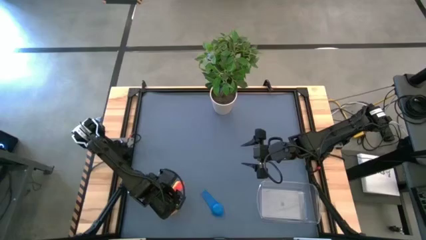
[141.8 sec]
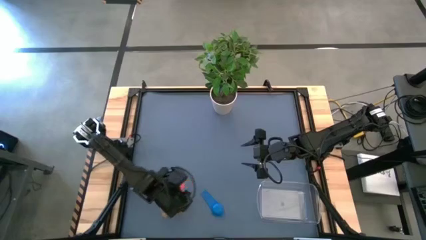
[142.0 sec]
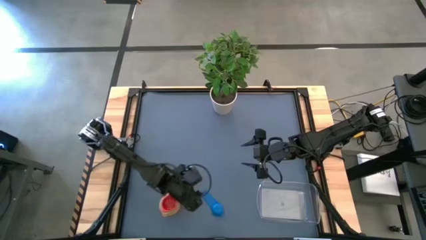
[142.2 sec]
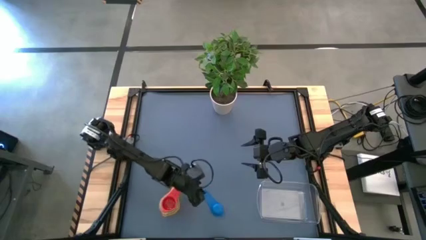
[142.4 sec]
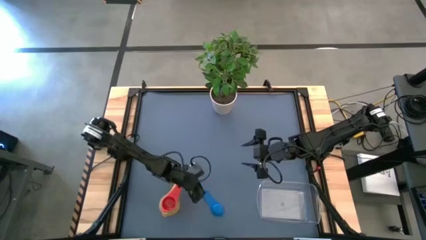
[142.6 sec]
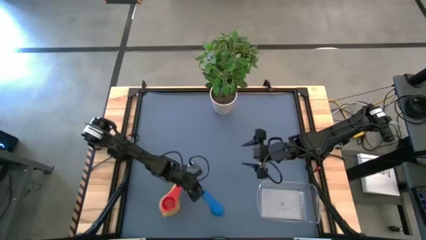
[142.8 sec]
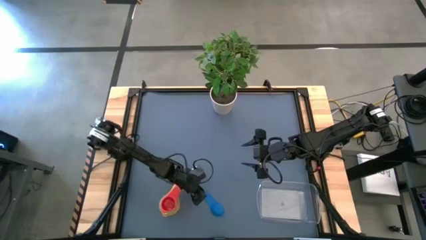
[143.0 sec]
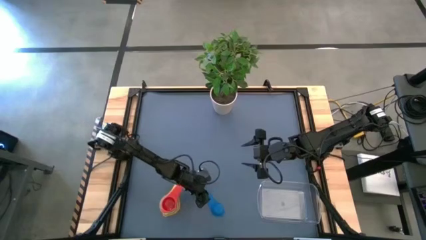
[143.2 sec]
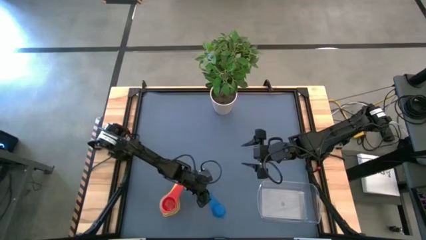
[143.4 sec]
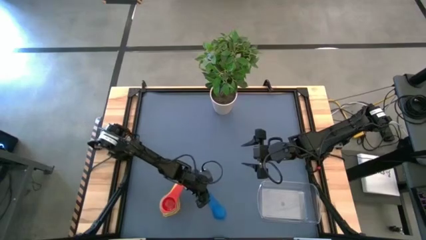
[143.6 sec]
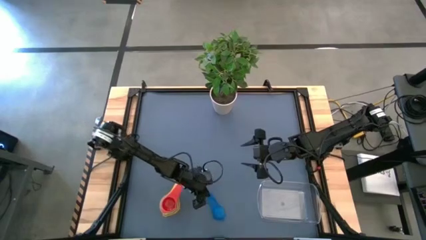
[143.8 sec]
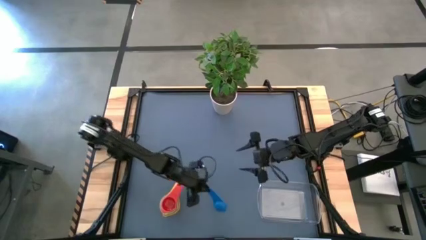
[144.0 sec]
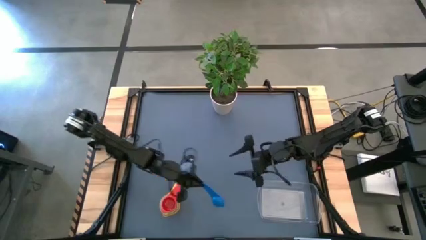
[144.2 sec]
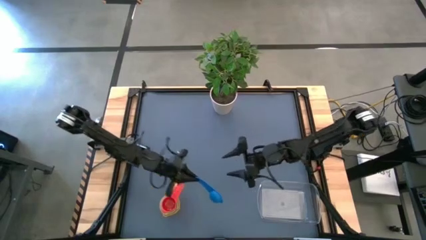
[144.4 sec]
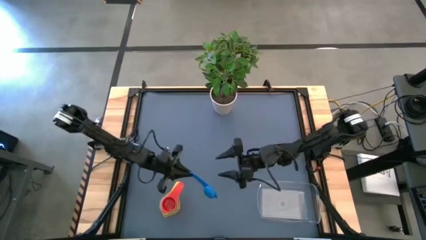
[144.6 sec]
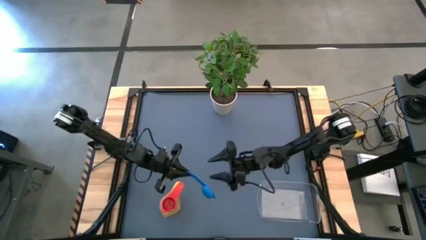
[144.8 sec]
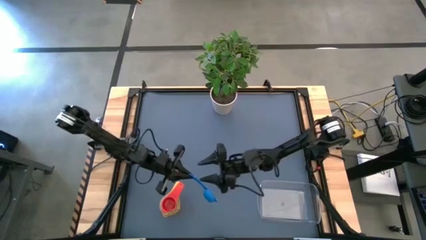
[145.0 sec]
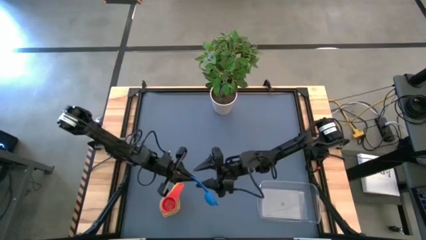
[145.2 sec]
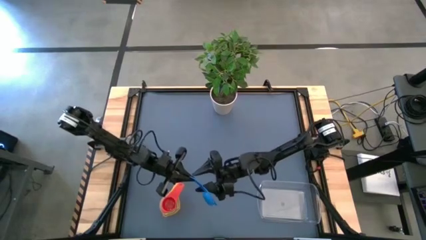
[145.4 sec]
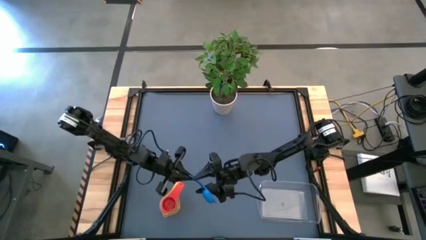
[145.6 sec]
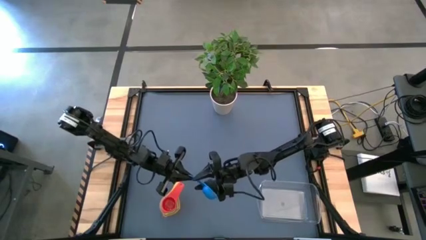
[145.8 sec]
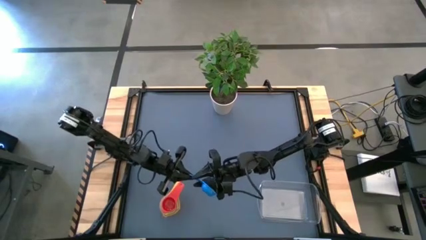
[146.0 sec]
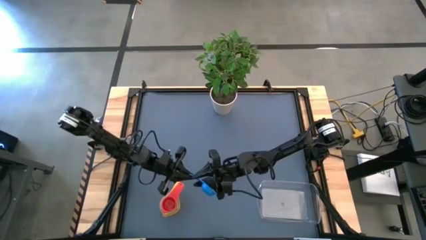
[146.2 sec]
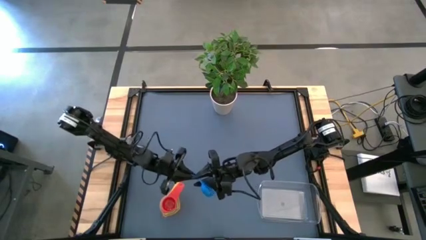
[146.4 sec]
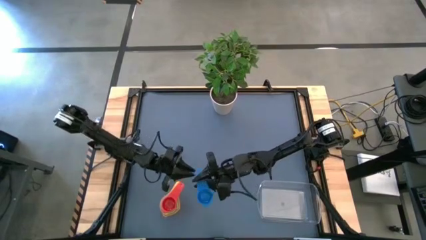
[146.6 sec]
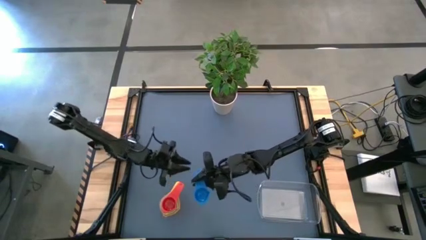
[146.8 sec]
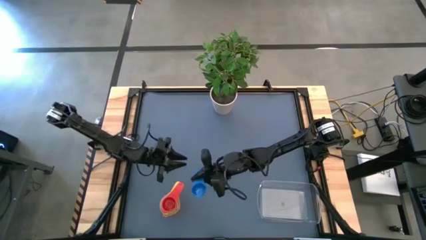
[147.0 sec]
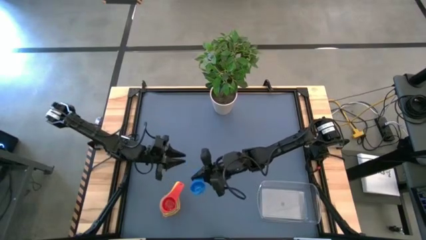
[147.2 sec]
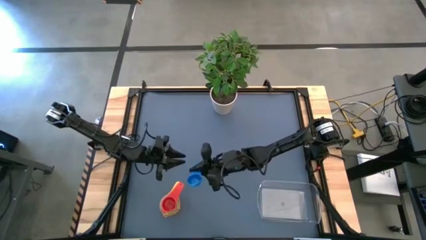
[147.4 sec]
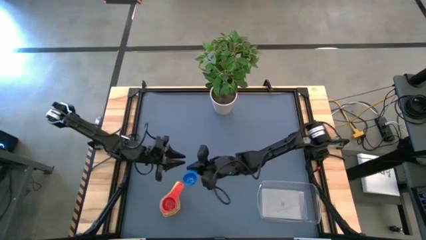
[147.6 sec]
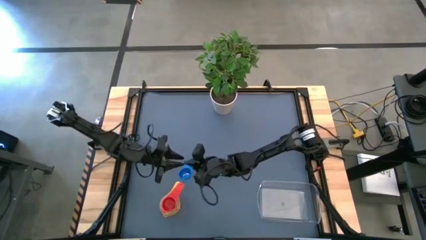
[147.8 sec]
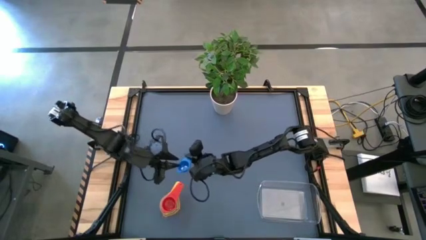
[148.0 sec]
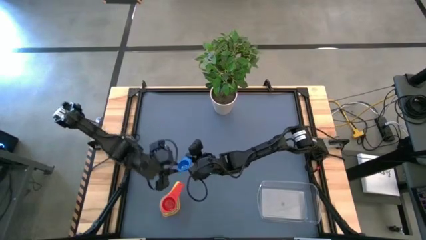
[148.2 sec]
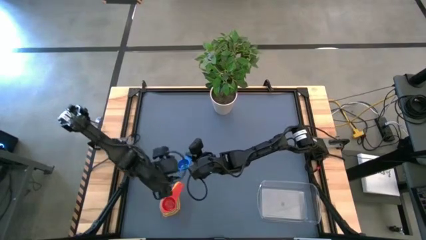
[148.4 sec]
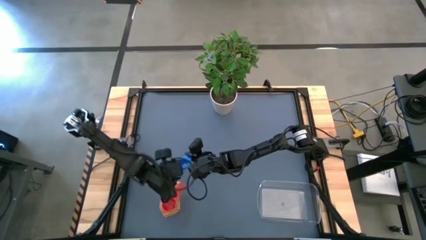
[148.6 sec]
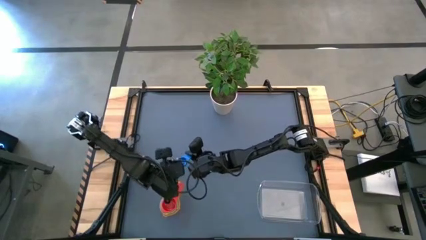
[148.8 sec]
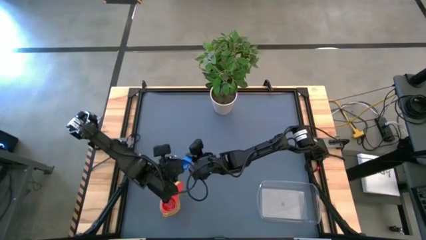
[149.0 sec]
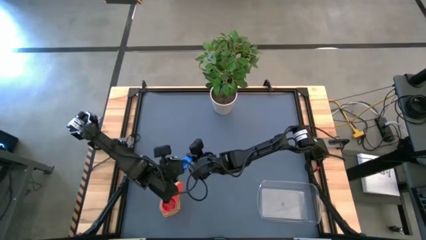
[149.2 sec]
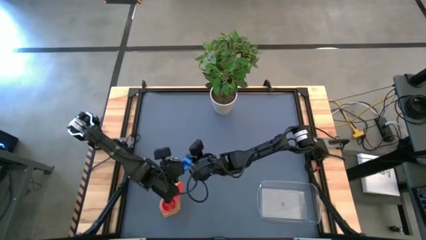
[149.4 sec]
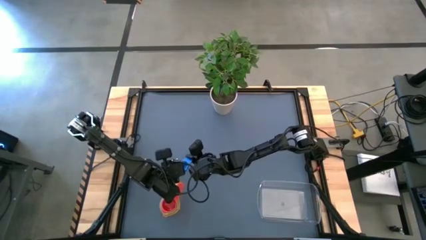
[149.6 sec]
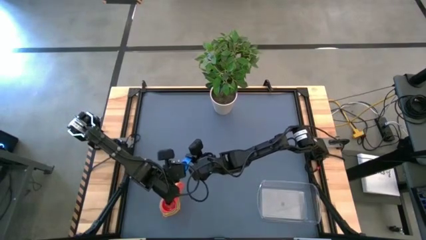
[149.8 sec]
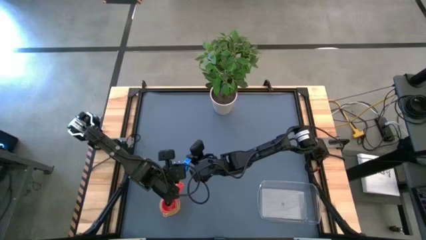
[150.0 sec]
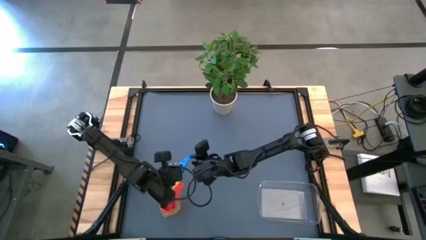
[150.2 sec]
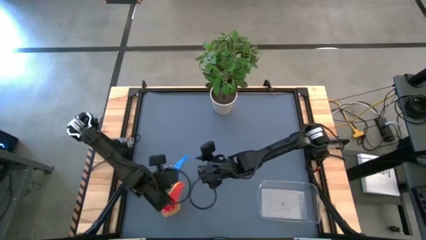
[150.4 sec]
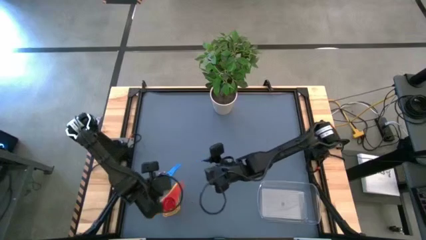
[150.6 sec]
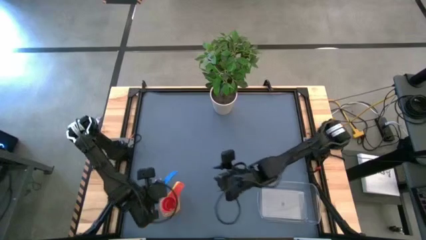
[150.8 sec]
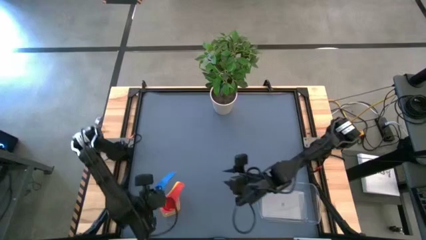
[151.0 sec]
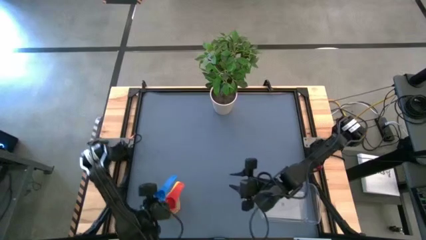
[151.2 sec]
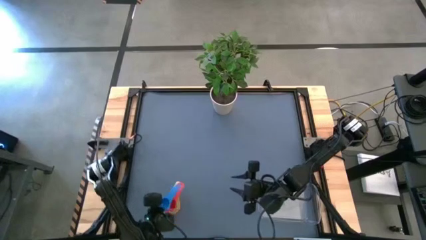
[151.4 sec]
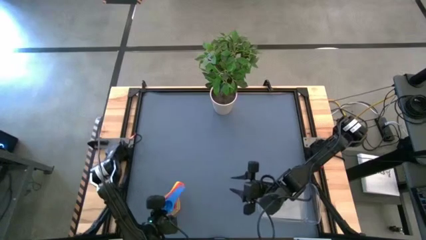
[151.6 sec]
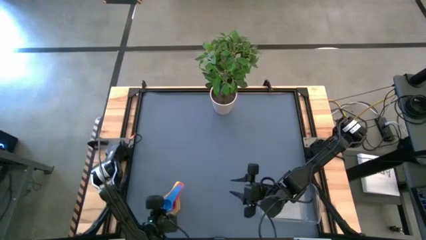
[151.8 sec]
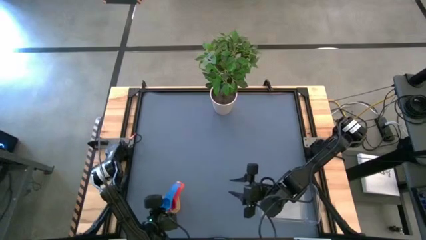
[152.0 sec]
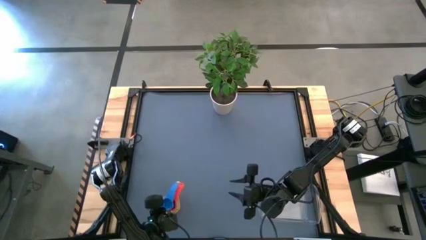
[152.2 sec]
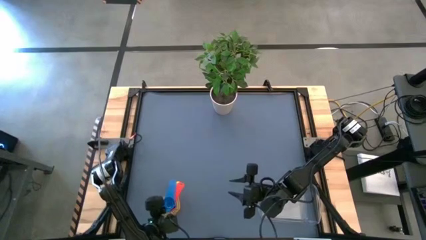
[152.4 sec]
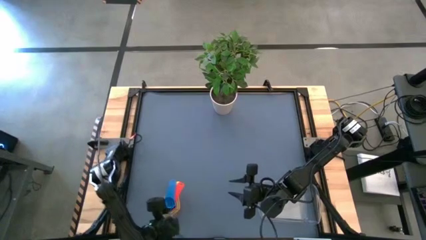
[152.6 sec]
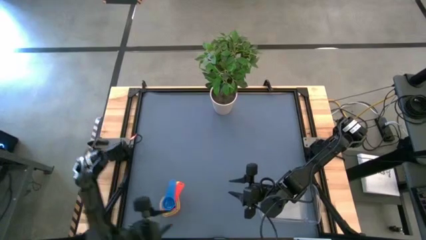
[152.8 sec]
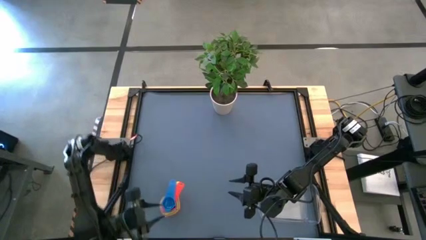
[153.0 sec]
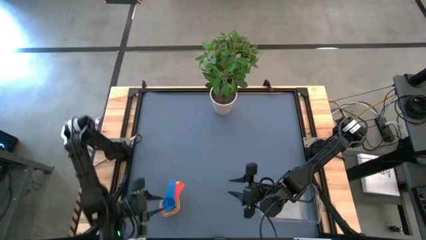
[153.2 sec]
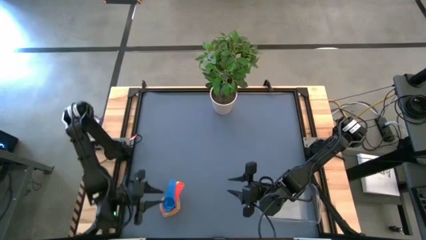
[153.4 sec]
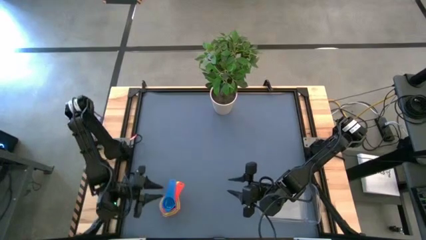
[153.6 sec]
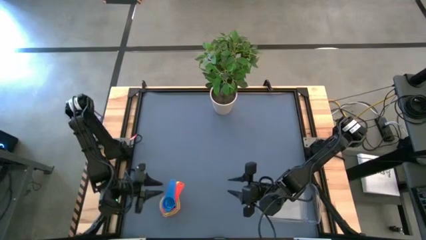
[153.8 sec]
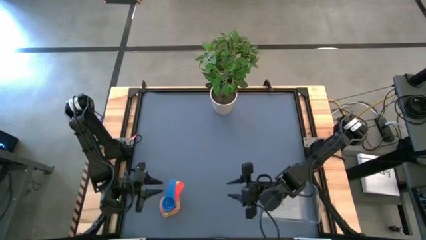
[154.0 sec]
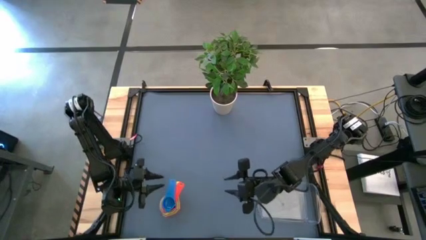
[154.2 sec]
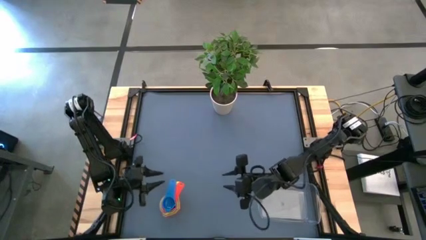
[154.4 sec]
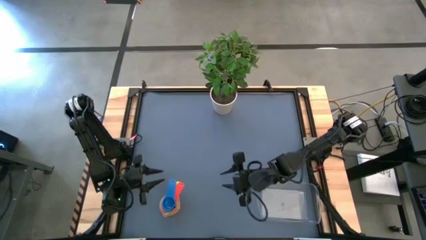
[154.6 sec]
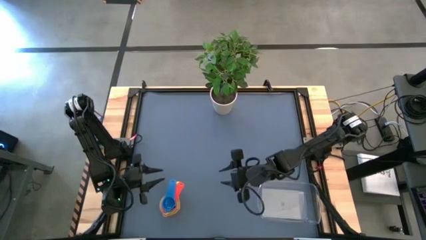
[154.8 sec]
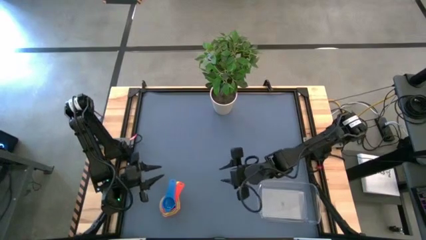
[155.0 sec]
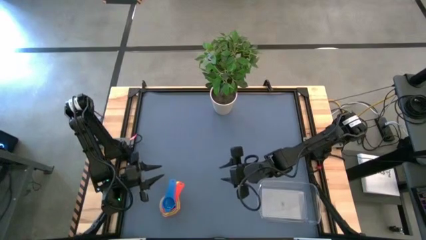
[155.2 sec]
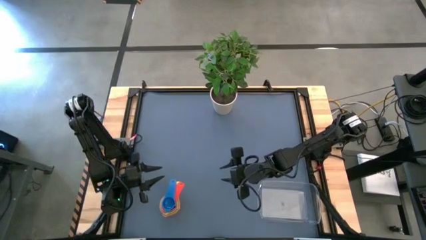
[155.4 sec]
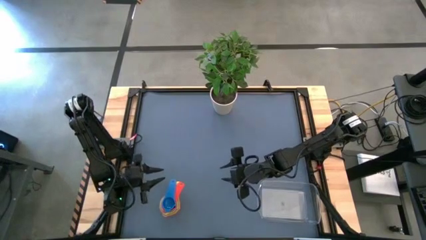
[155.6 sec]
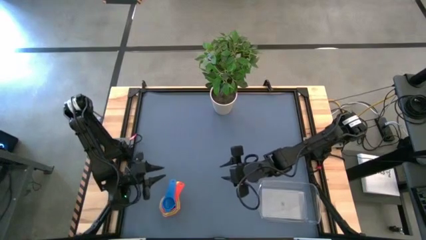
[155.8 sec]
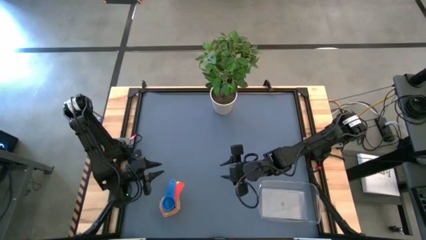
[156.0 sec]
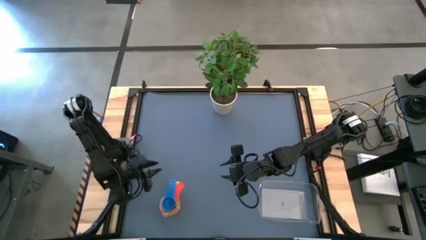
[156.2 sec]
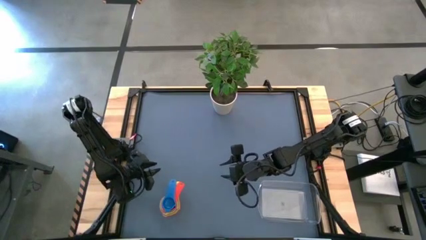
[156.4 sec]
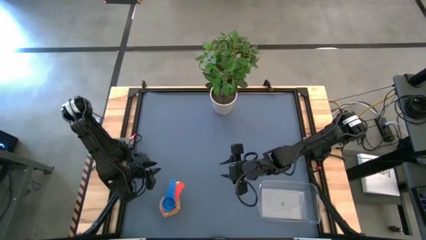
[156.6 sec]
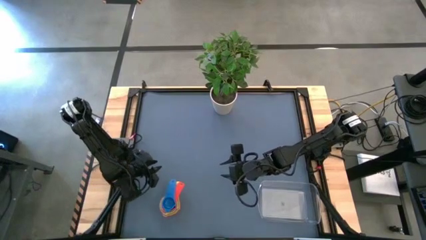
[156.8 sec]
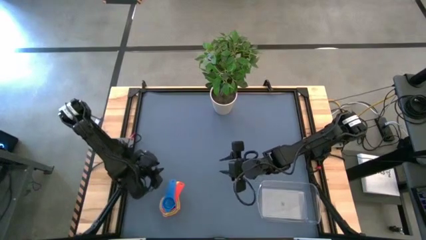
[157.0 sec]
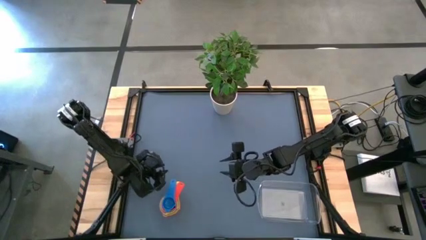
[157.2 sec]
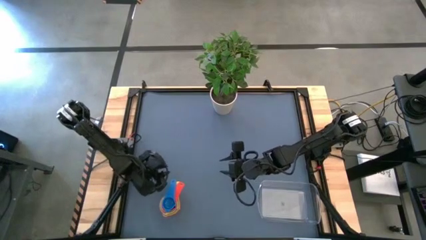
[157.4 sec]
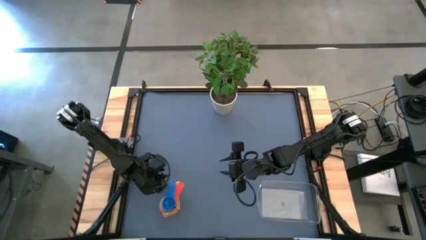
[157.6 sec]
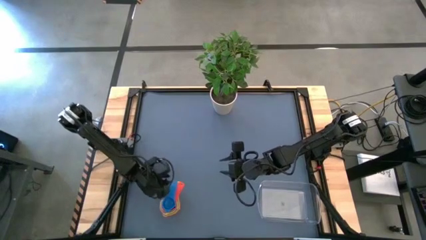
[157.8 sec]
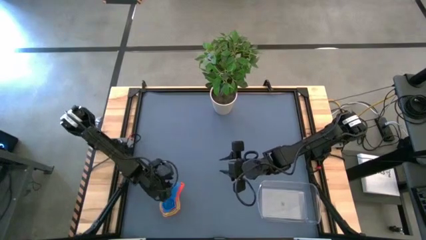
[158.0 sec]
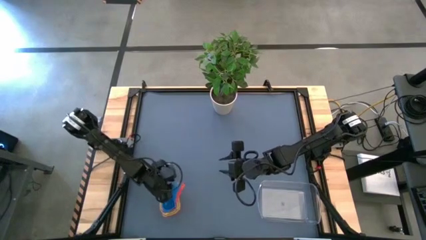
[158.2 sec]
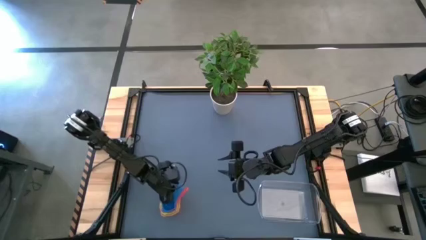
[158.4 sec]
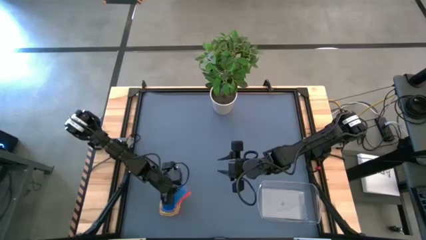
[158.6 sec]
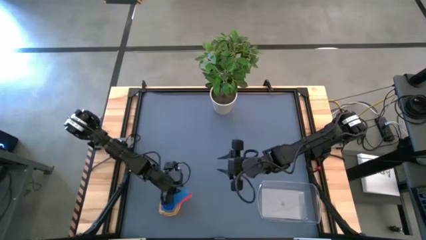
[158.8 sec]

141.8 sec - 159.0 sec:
Task: Nest measuring cups in basket
Stack the blue measuring cup on top of the orange measuring cup
